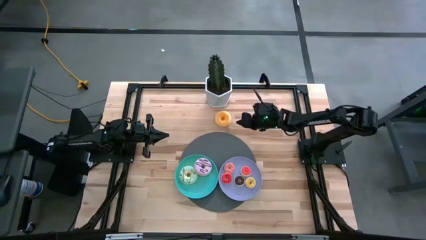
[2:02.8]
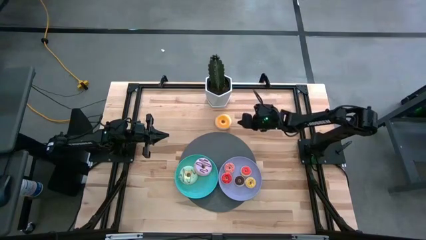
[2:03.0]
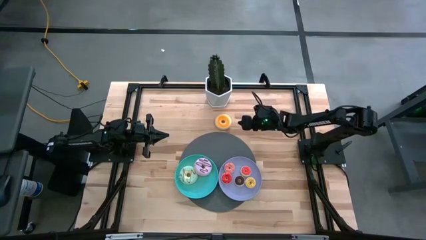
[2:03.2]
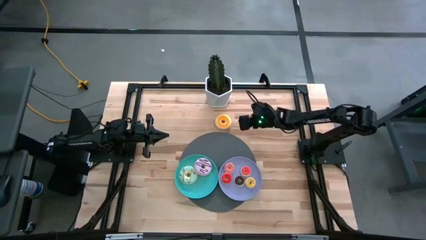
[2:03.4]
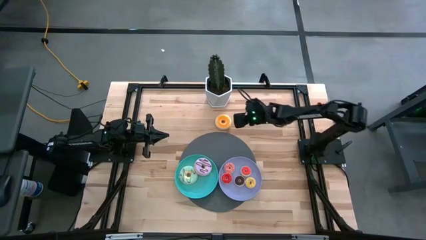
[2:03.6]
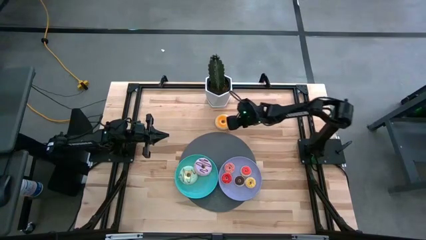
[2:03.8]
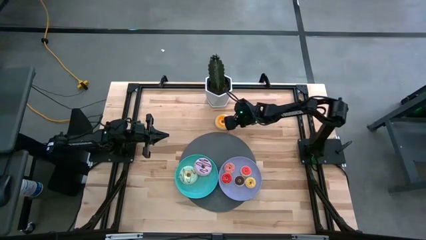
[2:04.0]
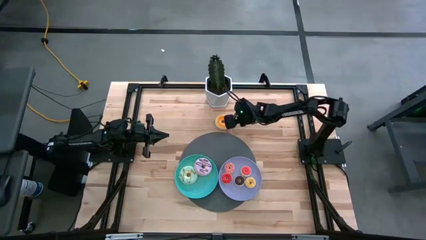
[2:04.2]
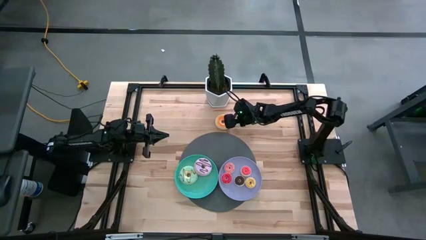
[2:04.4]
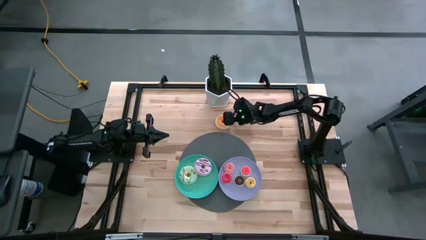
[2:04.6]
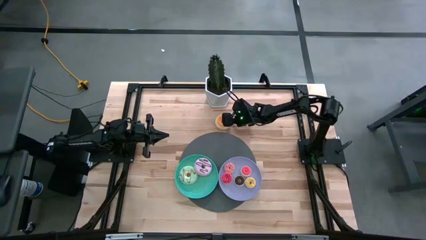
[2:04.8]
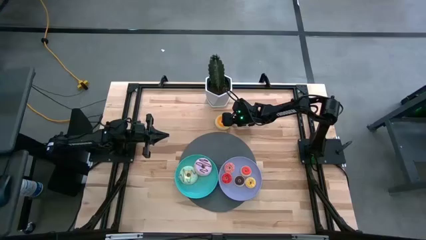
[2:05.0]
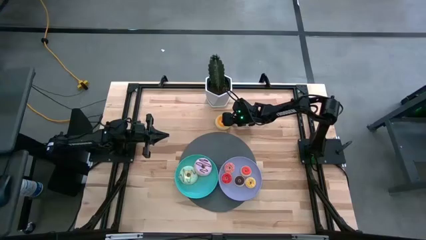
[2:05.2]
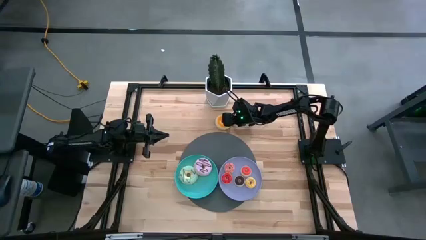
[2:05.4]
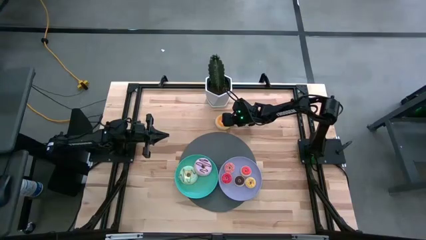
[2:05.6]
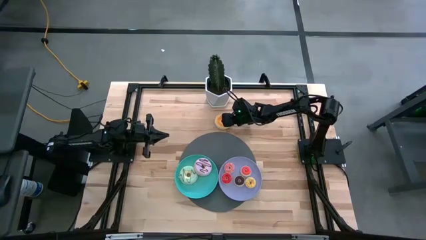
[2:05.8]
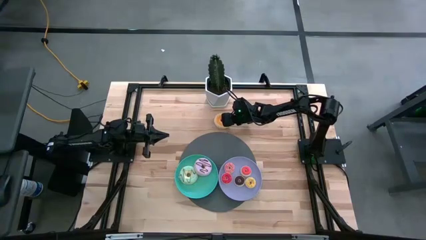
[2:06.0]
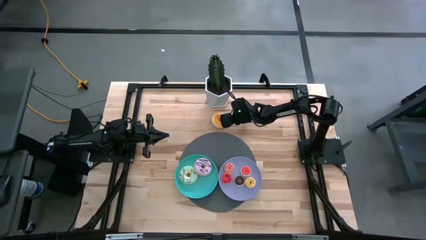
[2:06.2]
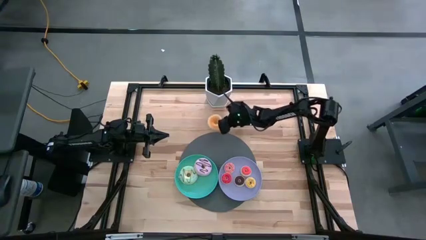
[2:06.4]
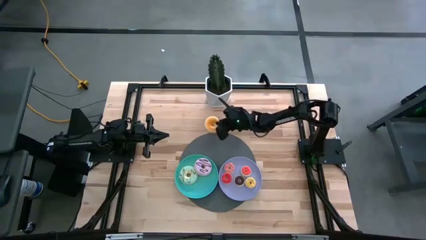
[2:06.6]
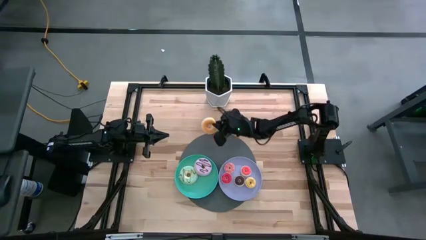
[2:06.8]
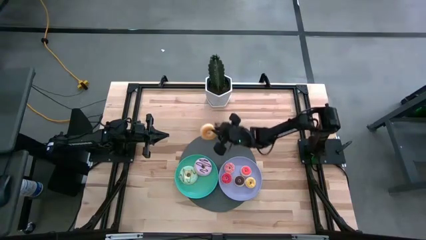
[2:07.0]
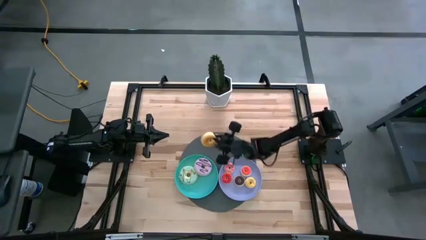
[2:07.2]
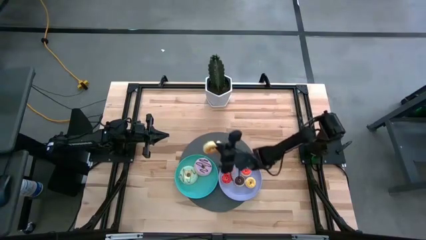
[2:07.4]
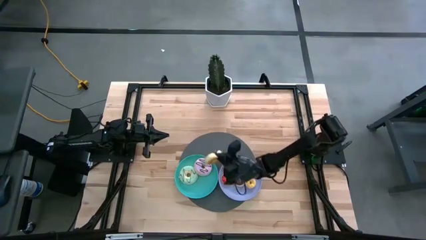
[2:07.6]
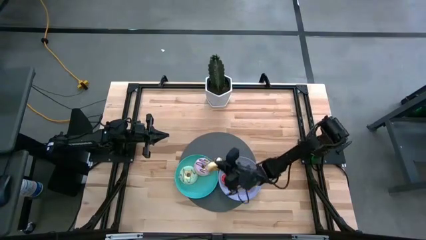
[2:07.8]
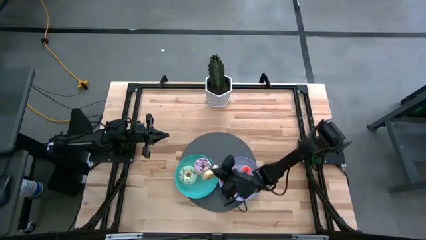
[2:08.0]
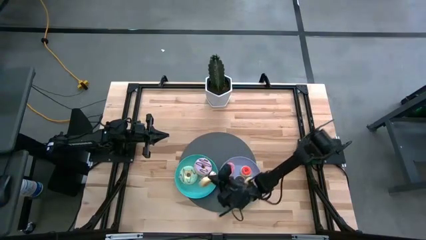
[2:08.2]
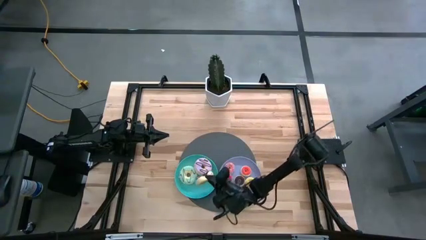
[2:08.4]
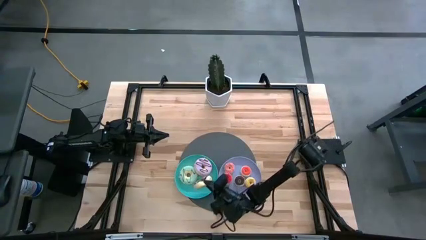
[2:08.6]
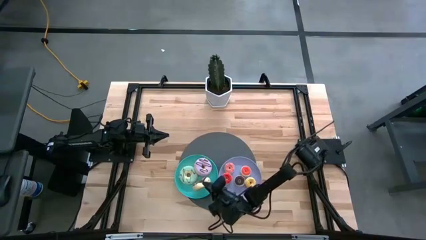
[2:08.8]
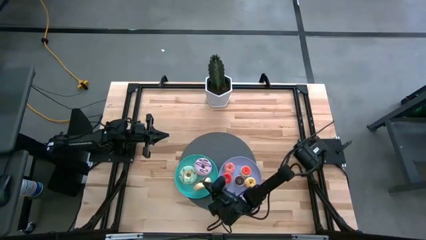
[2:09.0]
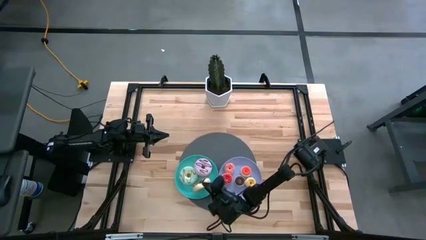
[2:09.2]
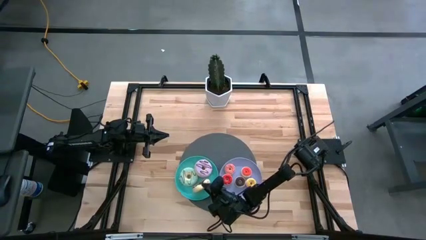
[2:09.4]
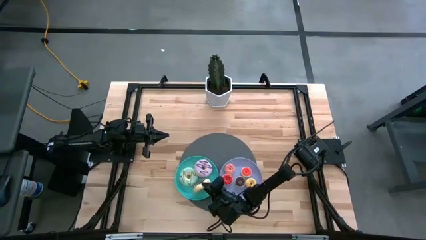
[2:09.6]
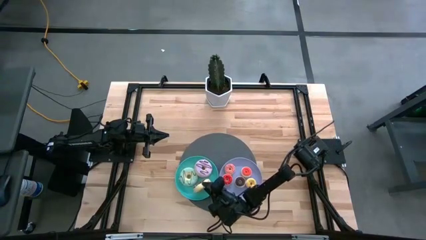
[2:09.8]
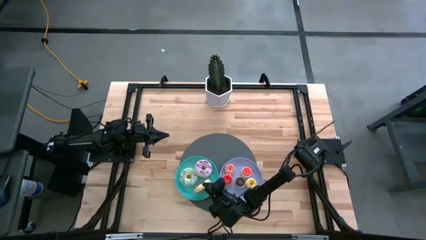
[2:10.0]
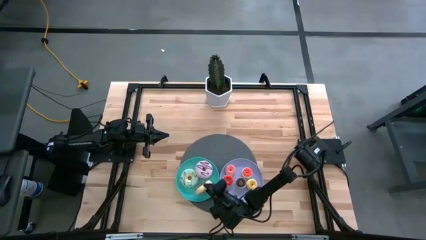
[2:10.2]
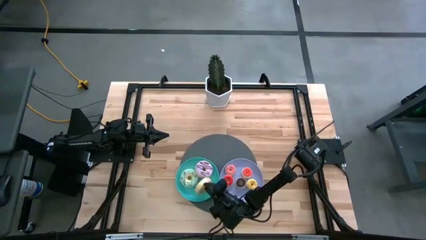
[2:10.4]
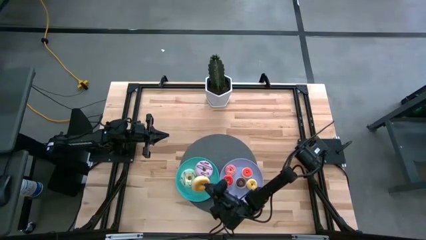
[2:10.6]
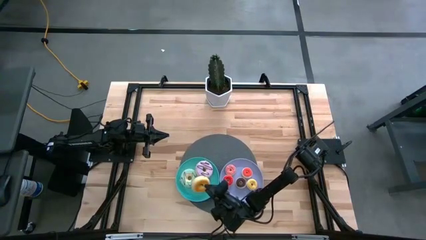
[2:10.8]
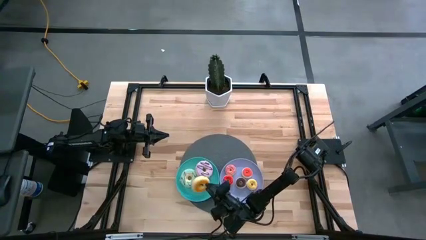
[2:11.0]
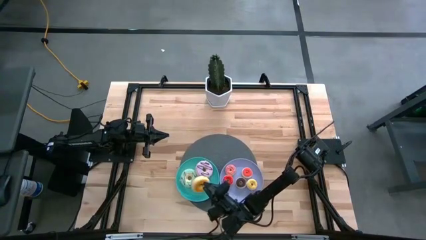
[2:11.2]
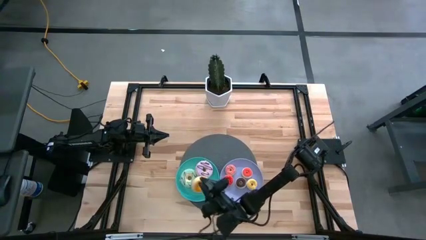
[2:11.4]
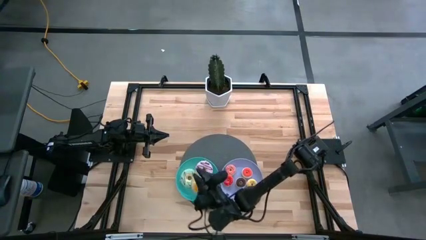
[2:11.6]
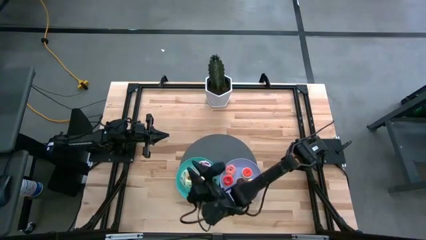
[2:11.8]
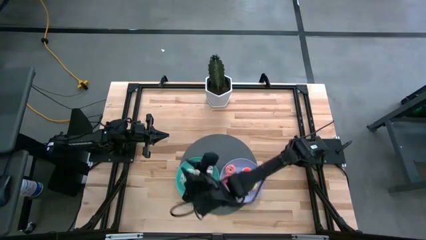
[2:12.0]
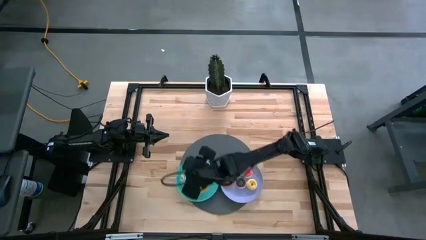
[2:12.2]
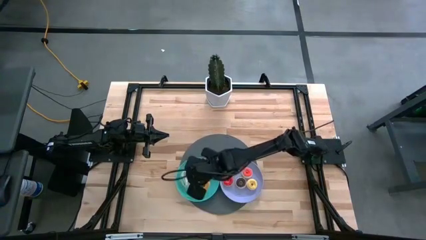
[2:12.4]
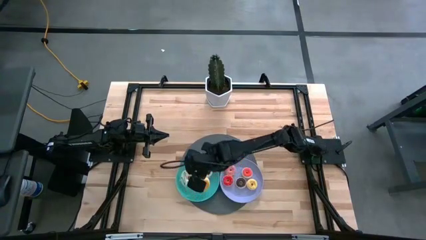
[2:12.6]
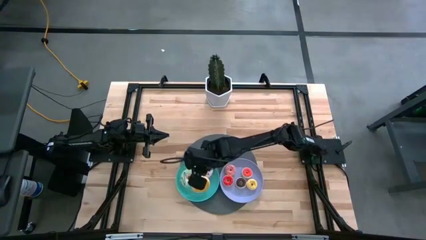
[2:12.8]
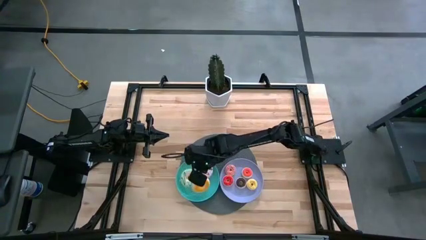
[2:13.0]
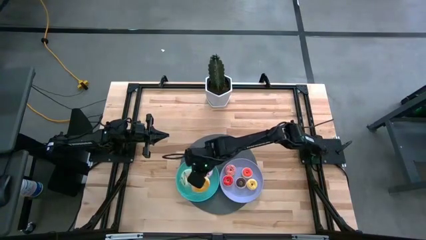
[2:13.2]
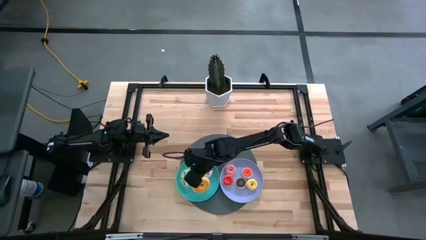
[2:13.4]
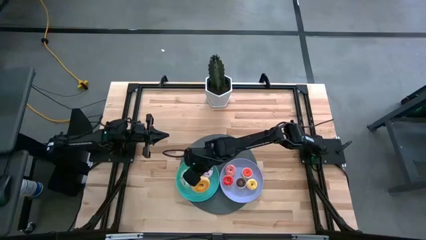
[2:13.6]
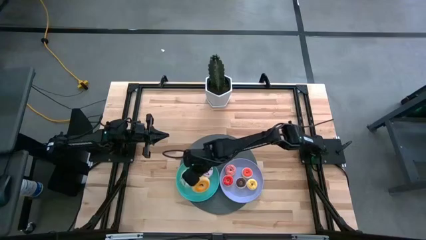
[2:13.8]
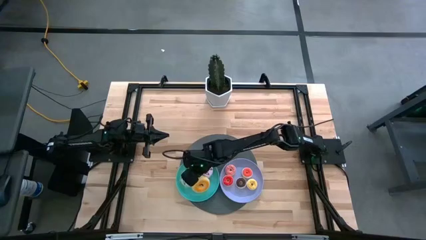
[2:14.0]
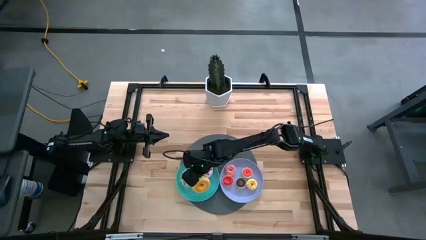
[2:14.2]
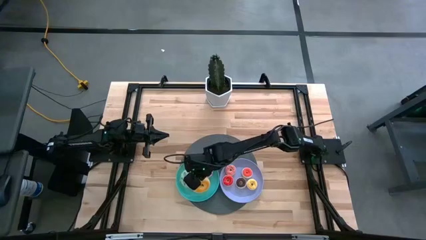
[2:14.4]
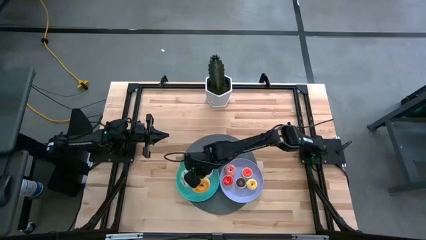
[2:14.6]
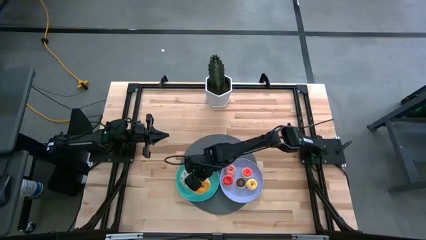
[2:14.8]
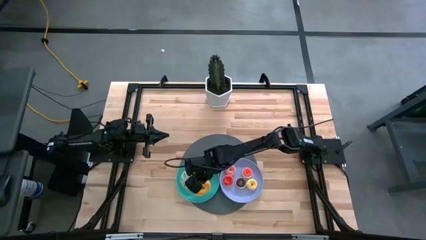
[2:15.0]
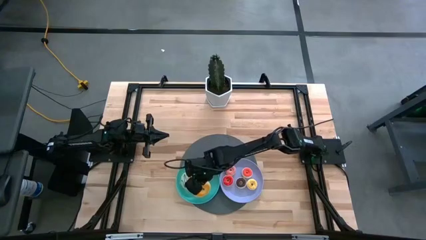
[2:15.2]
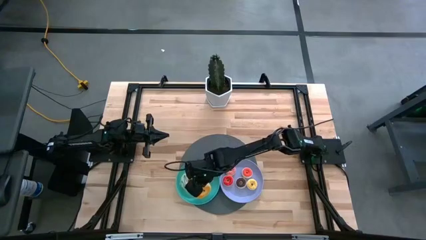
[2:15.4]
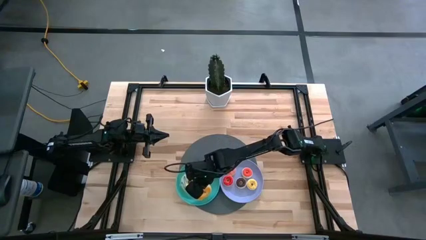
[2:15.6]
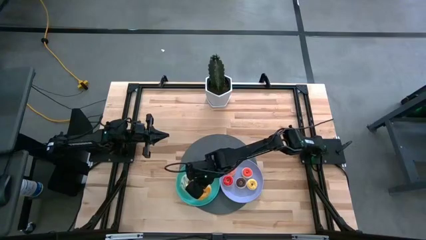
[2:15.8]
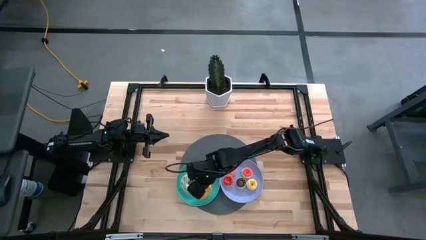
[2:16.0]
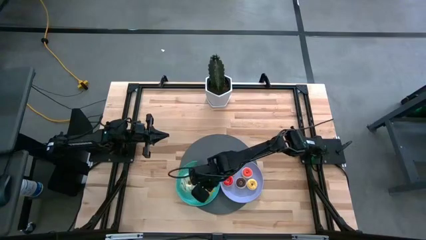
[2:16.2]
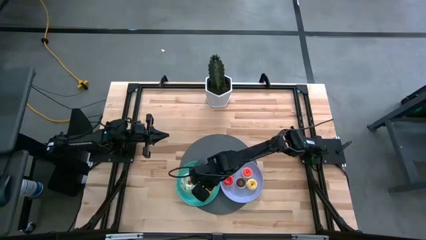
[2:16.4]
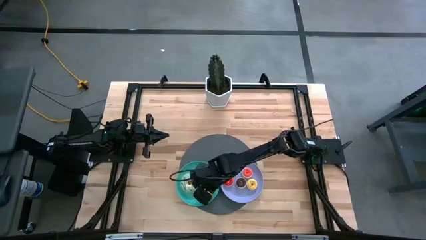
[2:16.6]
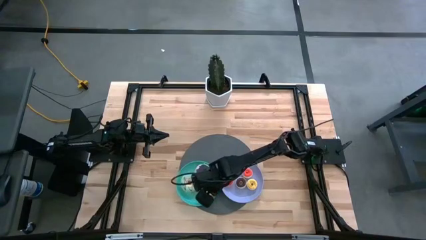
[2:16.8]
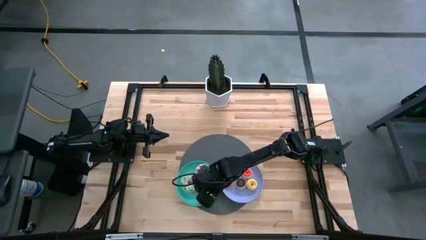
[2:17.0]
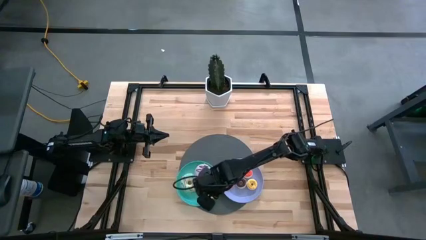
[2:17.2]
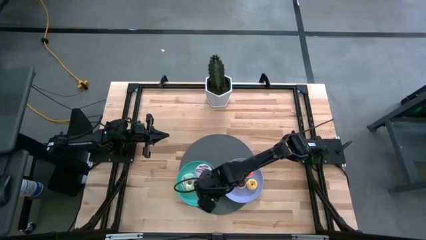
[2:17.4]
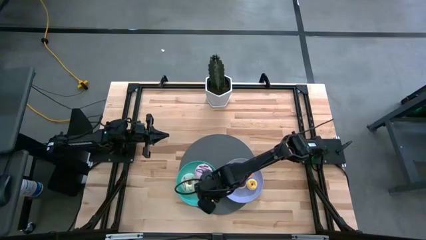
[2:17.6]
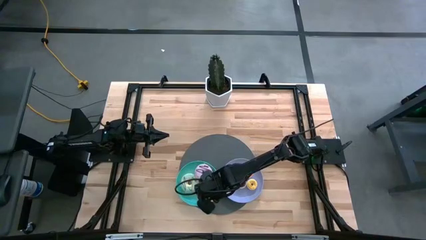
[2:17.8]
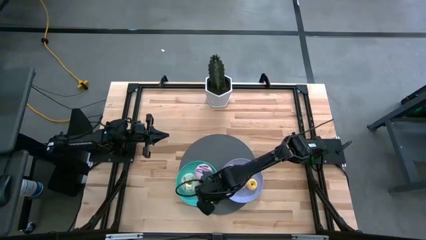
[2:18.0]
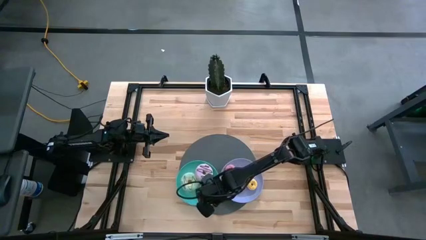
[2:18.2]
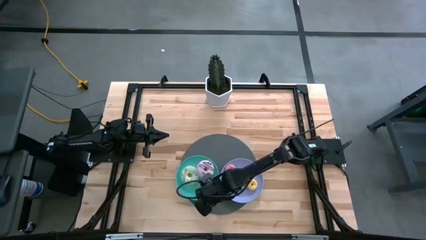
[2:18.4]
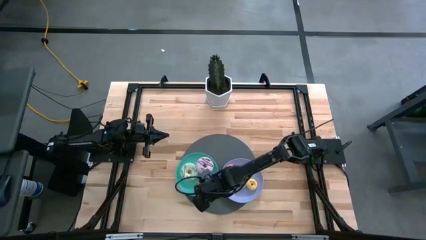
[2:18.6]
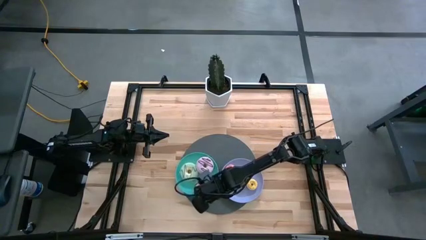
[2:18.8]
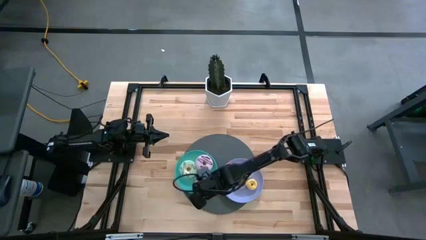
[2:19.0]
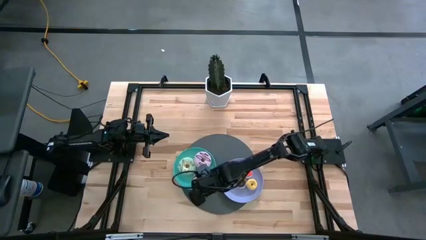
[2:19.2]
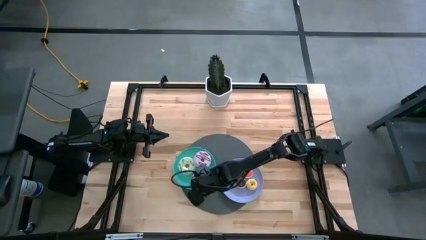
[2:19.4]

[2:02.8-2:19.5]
Task: Pick & Place donuts
Put the big black donut on the green plate
